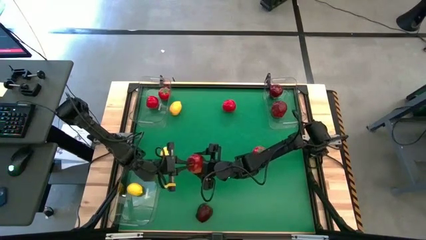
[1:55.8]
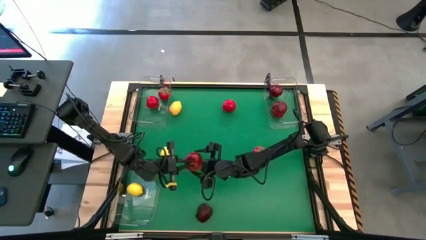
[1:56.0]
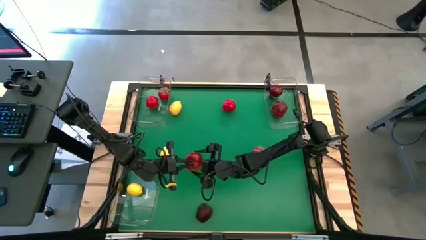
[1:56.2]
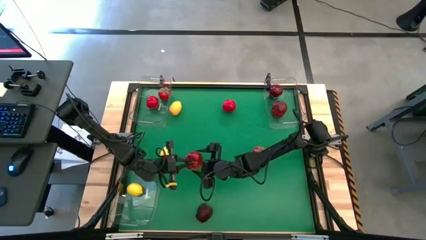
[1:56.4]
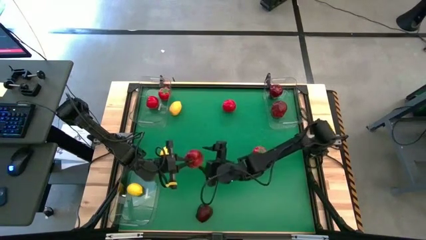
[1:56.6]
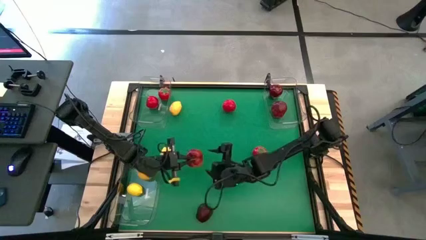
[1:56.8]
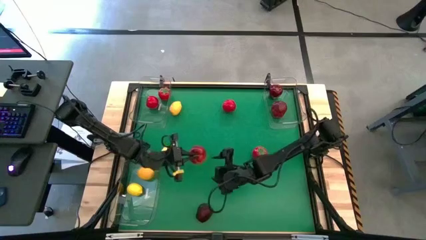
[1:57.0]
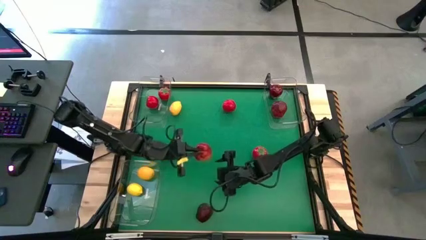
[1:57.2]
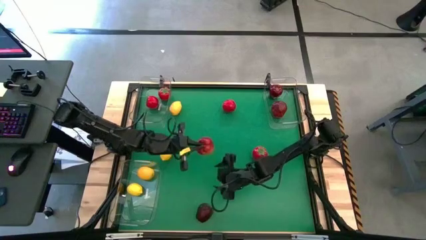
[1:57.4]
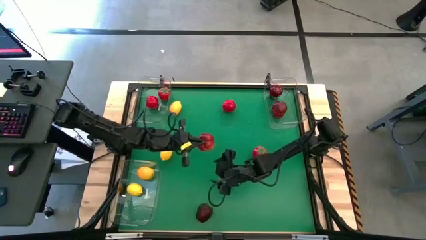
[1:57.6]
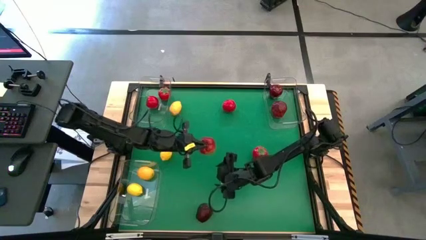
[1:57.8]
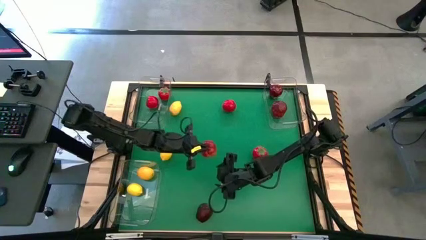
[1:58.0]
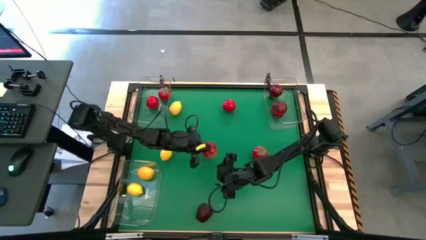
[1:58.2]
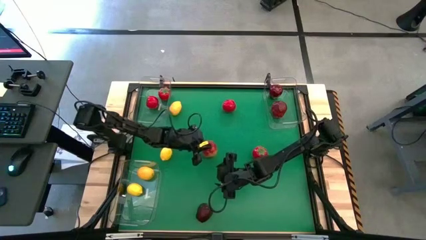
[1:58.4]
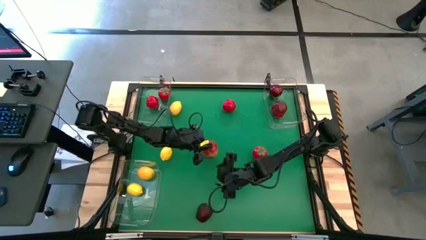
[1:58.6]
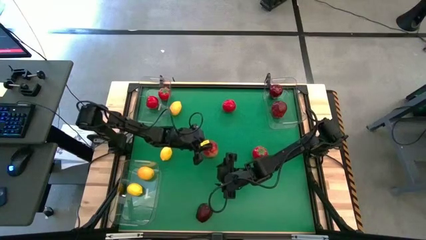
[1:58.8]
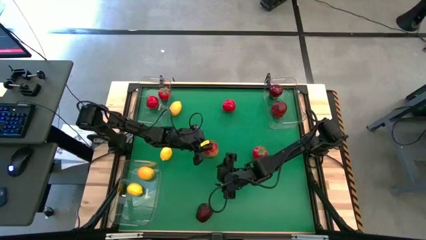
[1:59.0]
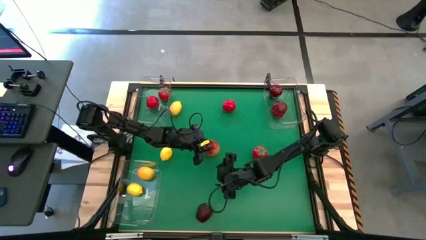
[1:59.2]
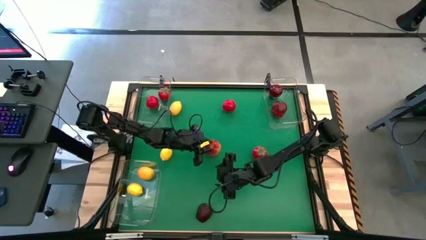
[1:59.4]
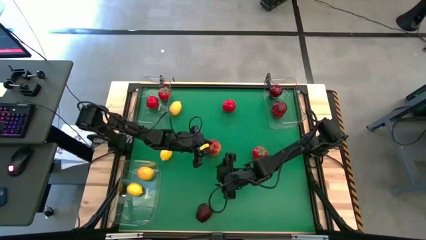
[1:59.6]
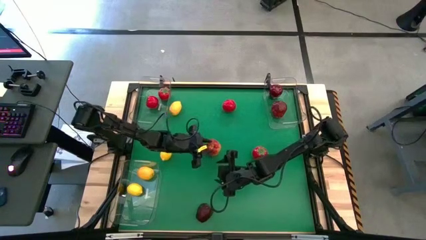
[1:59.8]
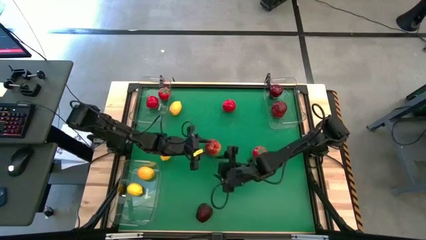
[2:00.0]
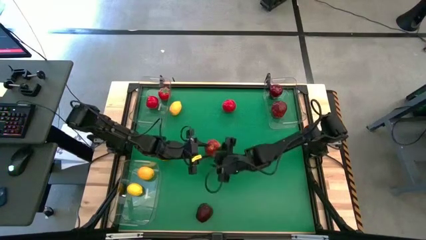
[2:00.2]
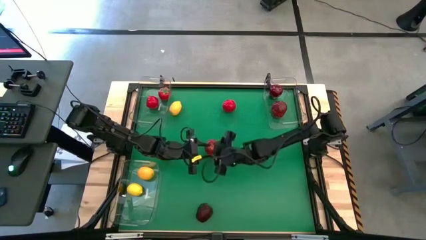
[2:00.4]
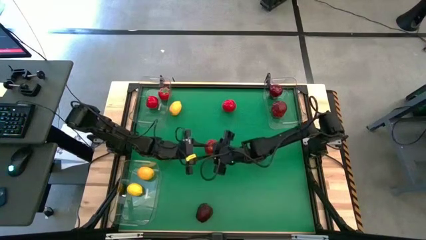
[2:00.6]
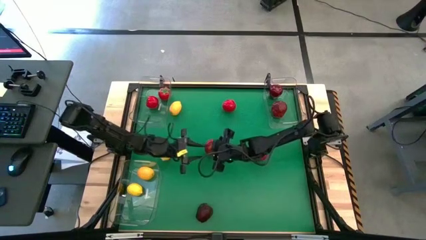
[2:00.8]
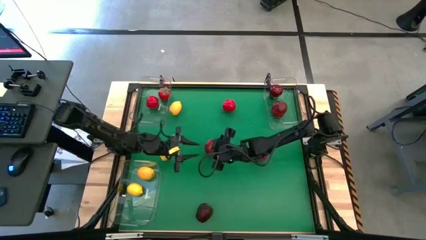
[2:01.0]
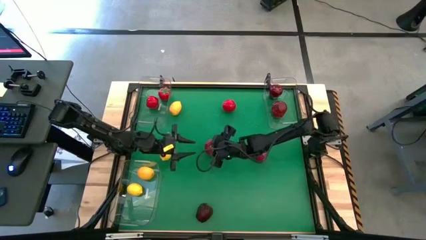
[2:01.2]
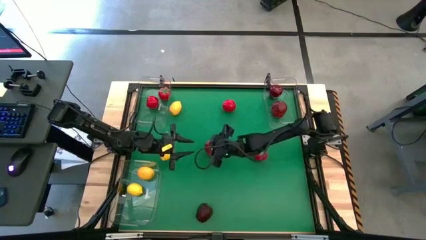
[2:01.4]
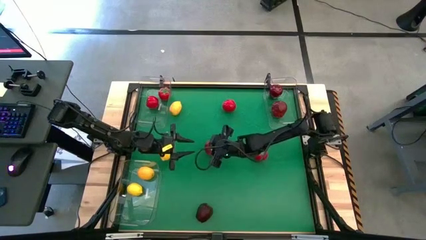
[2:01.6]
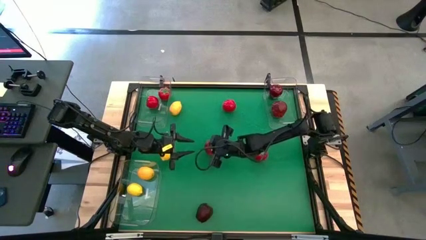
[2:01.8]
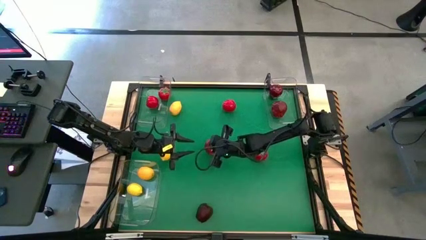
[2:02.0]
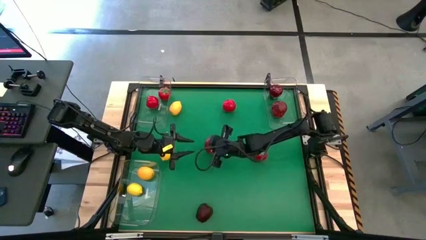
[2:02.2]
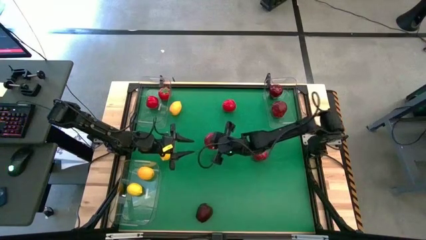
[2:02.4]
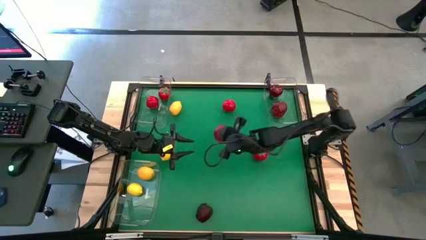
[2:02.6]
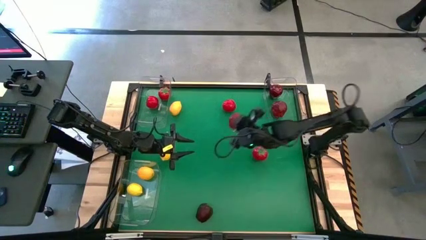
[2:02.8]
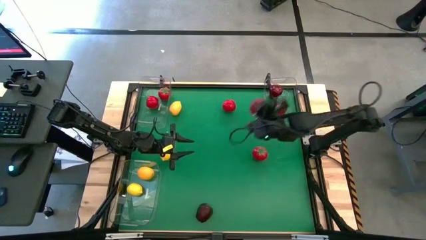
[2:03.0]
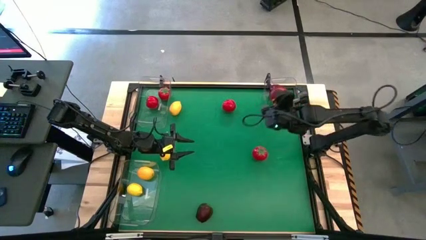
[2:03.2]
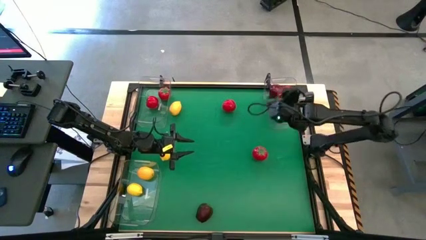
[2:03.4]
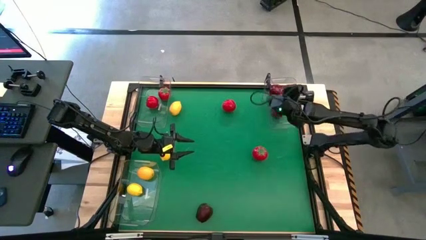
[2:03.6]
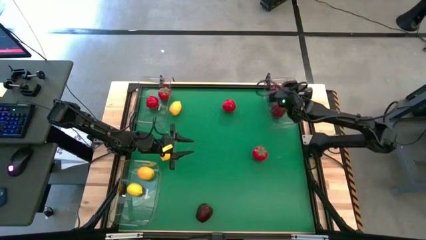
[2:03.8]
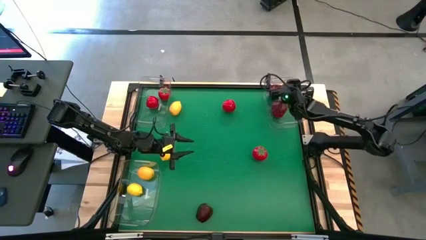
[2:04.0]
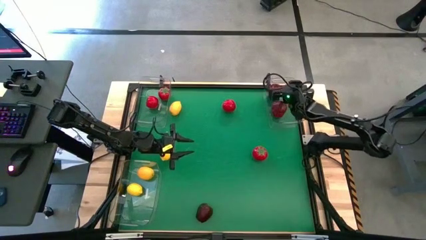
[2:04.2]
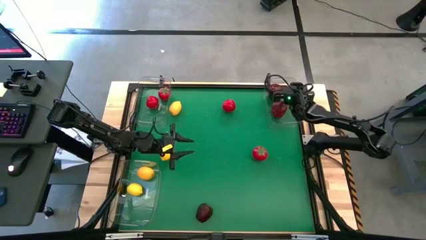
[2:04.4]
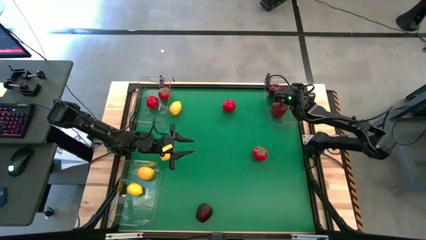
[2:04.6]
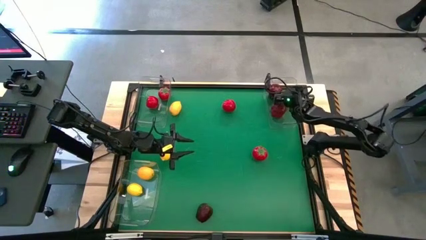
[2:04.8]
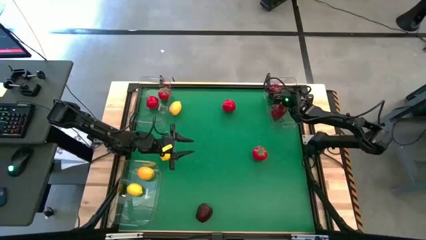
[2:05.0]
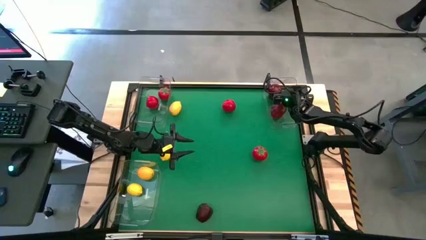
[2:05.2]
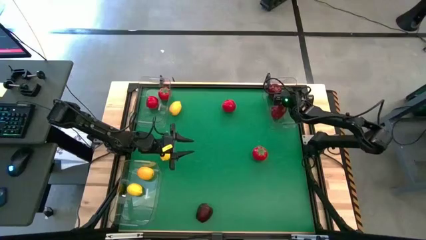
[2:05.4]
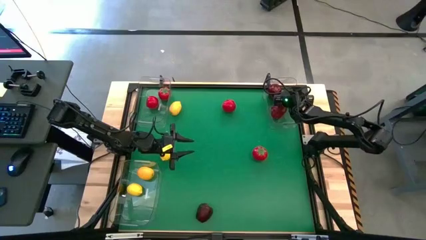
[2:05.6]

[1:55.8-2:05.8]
Task: Sort produce into baskets
Put the apple into the top right bin

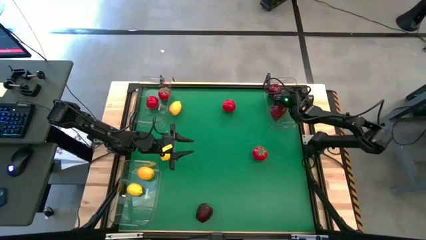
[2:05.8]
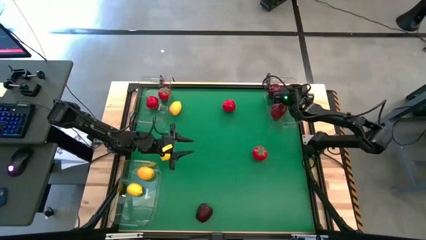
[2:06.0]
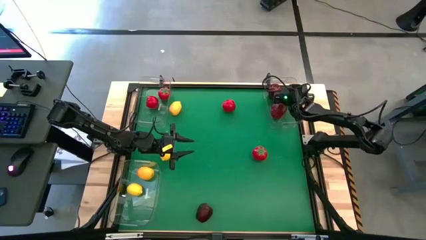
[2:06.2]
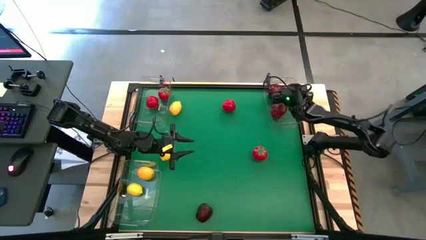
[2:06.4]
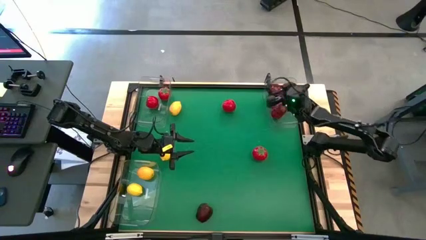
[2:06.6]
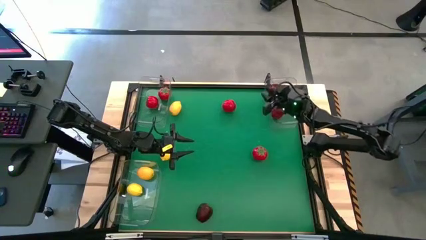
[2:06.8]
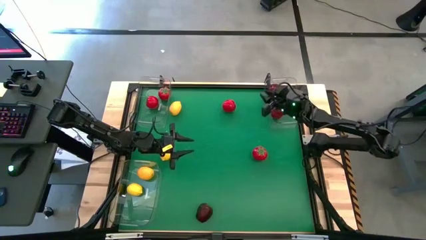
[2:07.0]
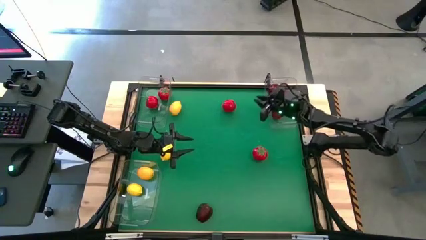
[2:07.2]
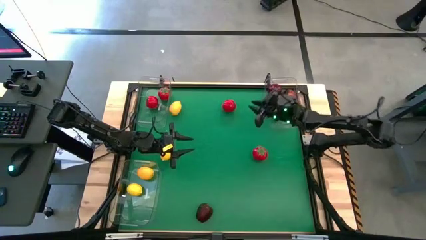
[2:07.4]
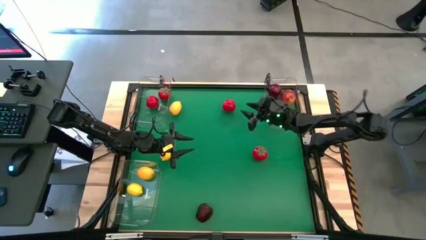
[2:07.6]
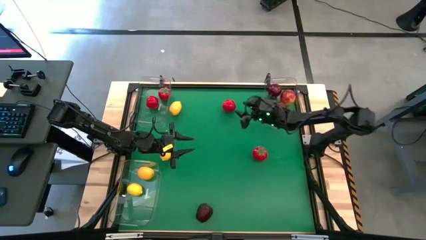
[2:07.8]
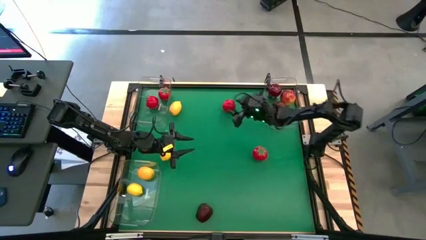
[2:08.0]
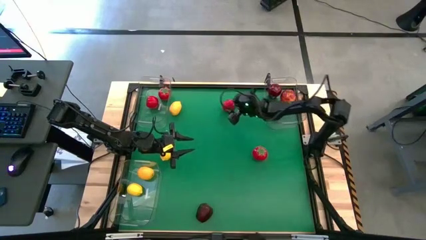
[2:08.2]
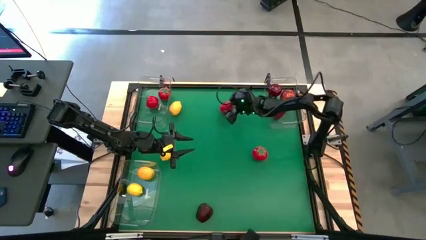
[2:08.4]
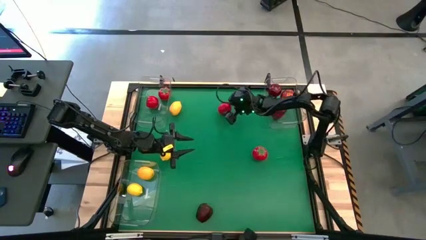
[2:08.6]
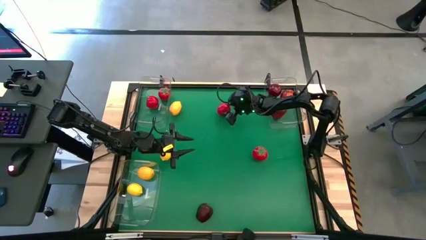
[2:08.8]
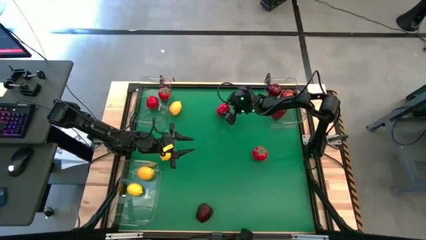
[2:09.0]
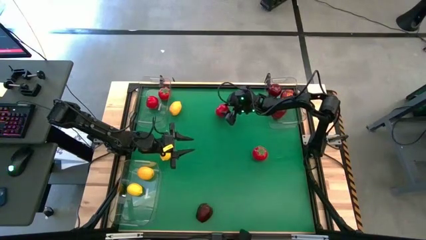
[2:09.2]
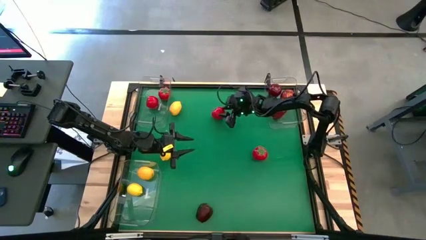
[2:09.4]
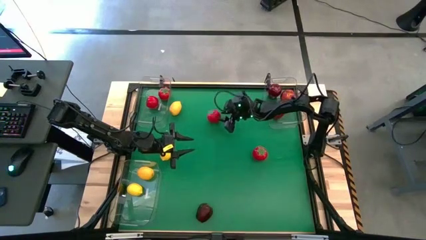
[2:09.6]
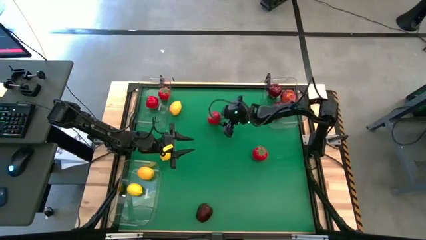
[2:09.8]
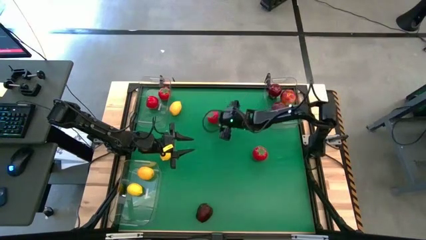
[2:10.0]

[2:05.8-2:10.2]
Put the tomato into the top left bin

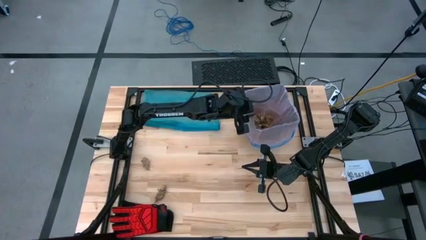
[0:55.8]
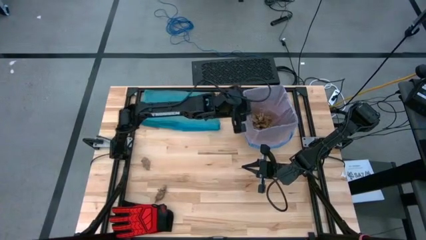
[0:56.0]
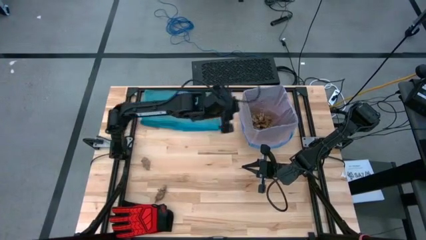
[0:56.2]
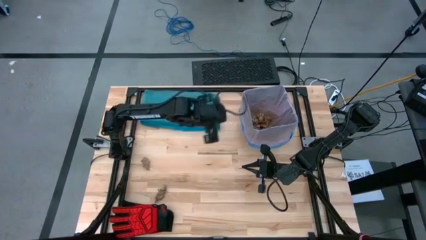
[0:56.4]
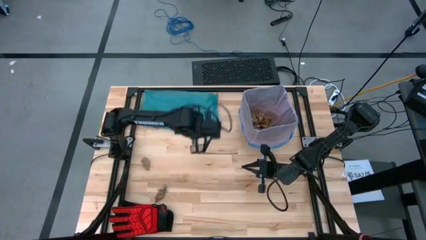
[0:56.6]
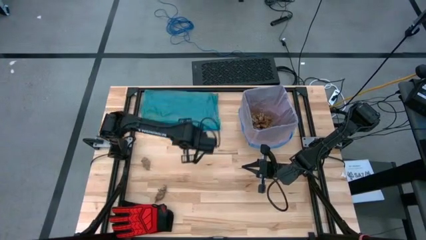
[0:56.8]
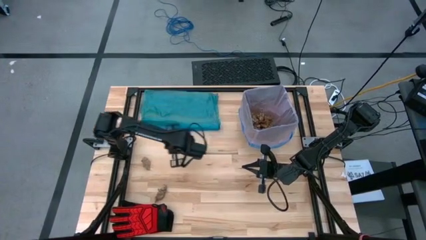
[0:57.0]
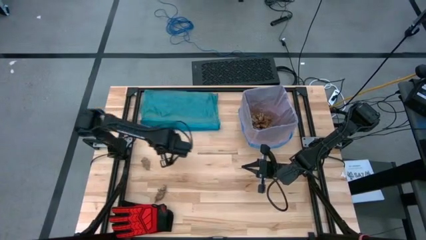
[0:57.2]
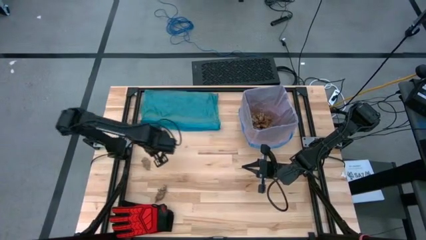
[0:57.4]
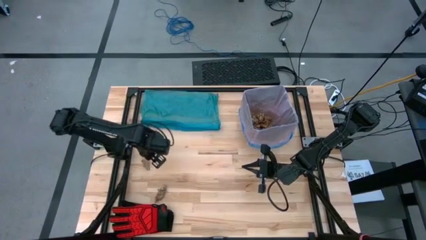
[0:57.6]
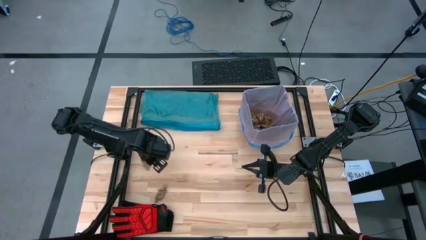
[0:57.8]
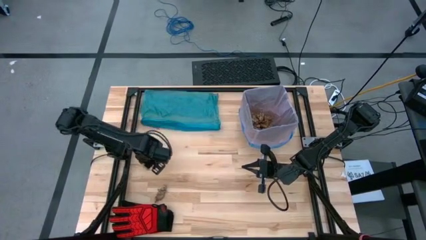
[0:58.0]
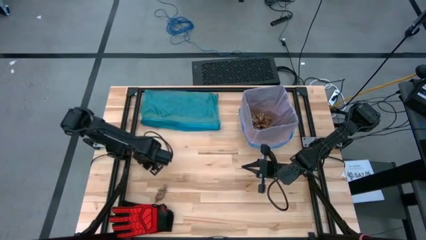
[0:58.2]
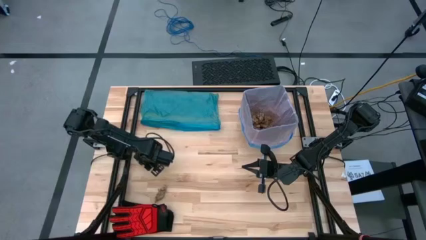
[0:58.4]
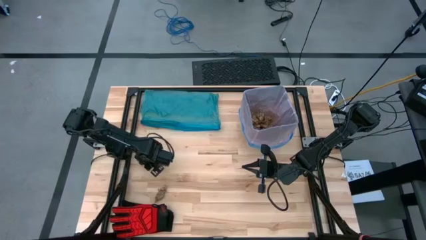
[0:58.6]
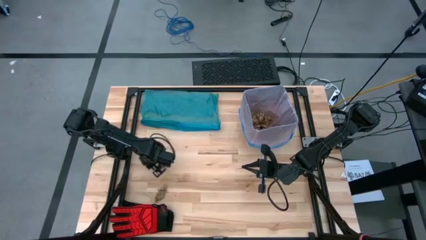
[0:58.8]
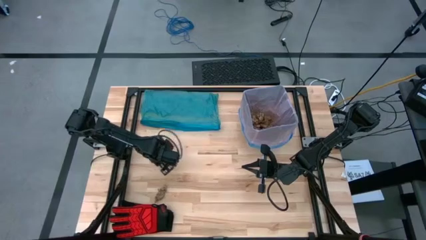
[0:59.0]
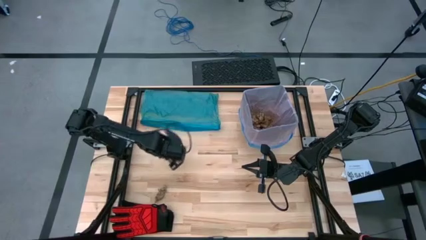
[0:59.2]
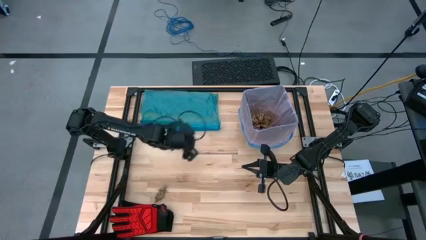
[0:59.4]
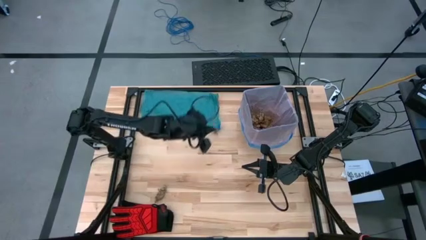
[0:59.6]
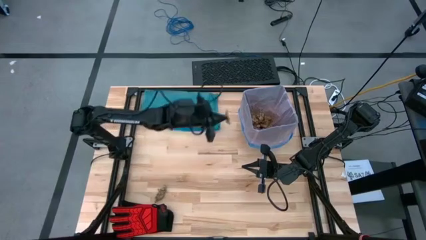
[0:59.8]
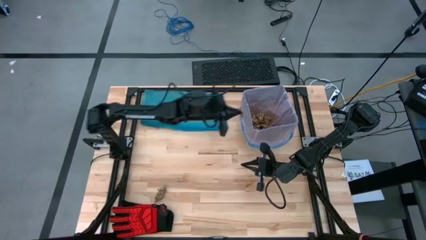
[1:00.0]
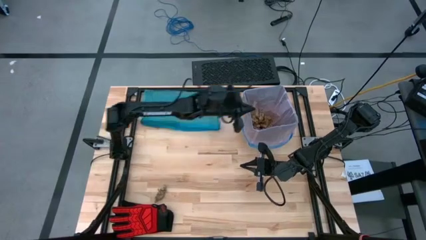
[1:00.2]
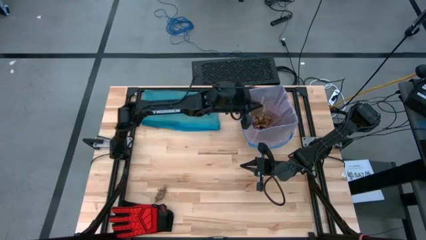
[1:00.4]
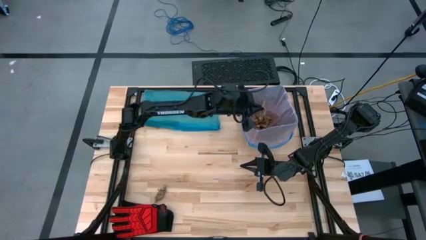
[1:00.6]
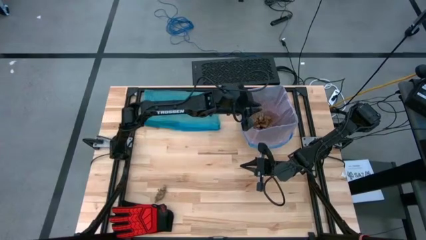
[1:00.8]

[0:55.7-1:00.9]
Task: place trash/remove bag and relplace
Put the brown napkin into the trash bin
